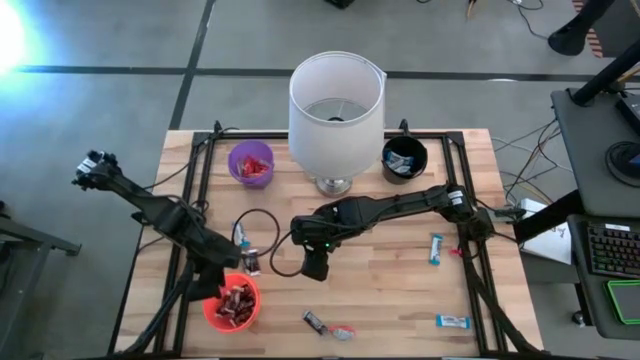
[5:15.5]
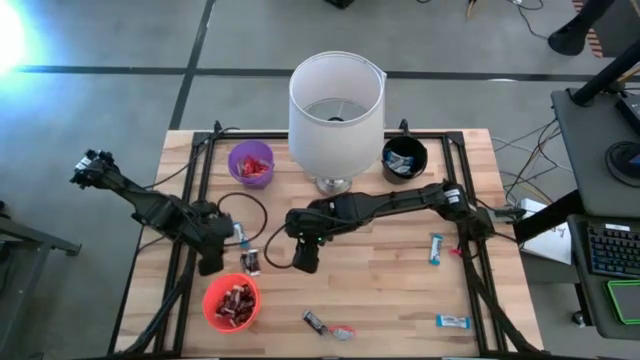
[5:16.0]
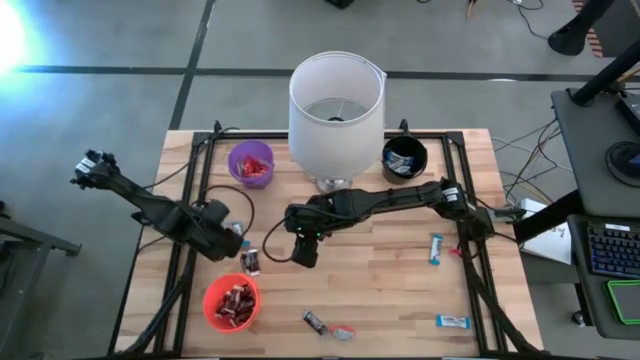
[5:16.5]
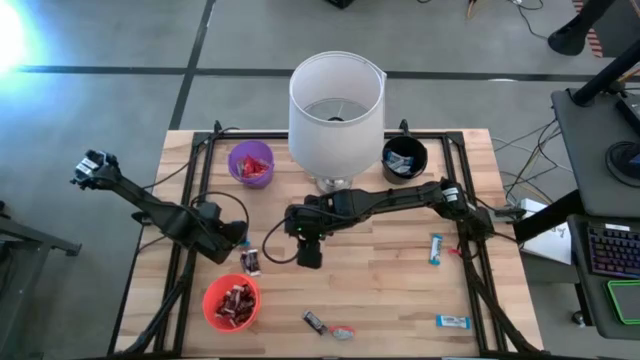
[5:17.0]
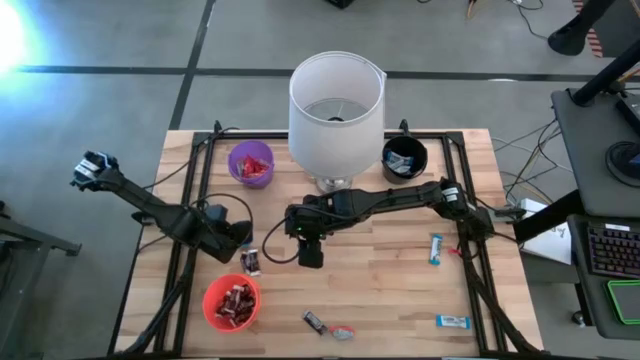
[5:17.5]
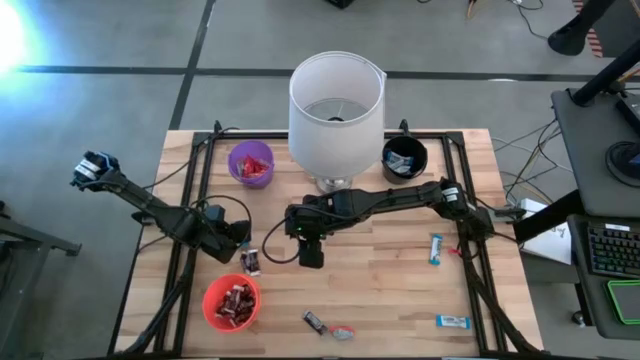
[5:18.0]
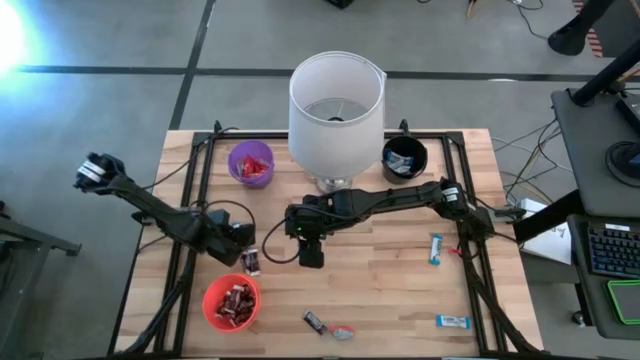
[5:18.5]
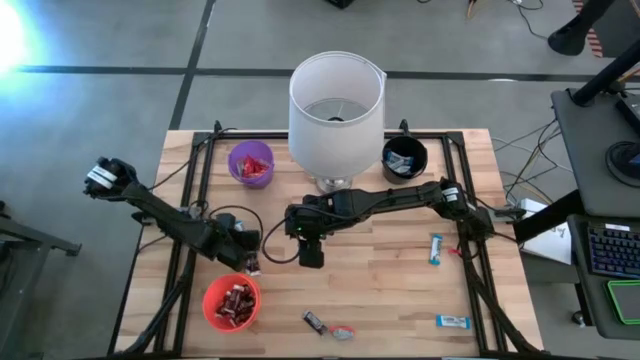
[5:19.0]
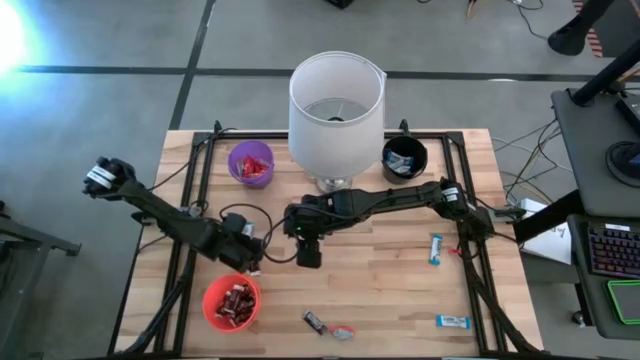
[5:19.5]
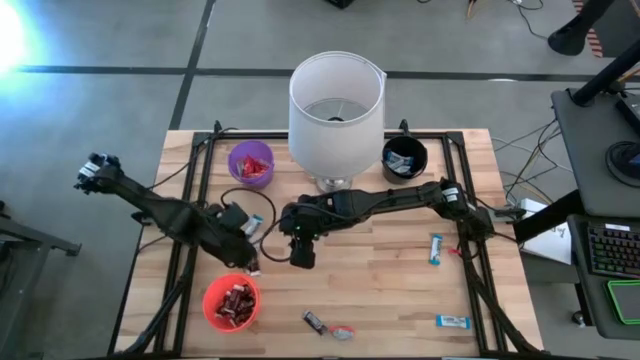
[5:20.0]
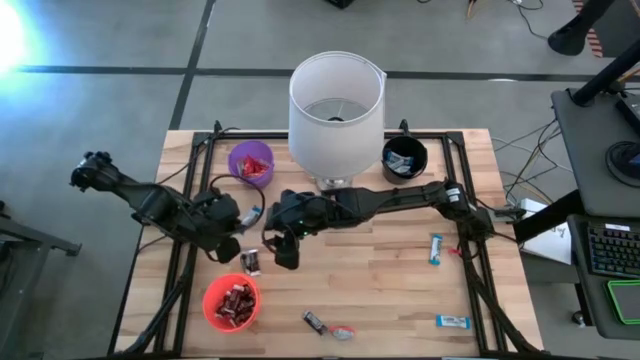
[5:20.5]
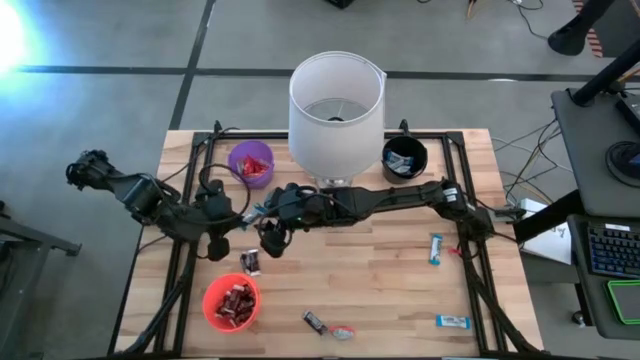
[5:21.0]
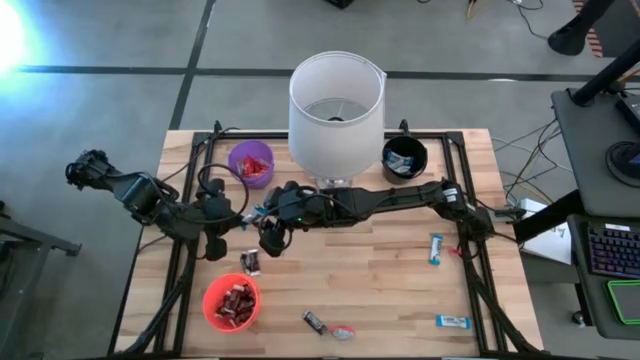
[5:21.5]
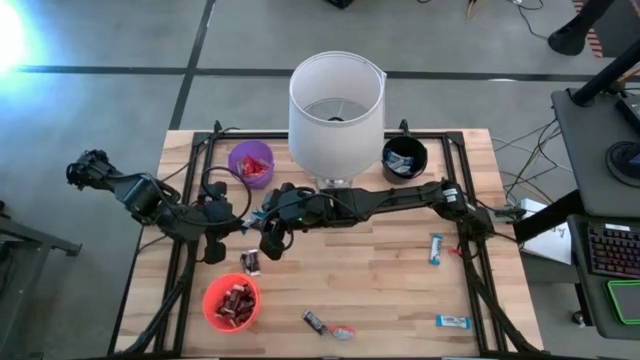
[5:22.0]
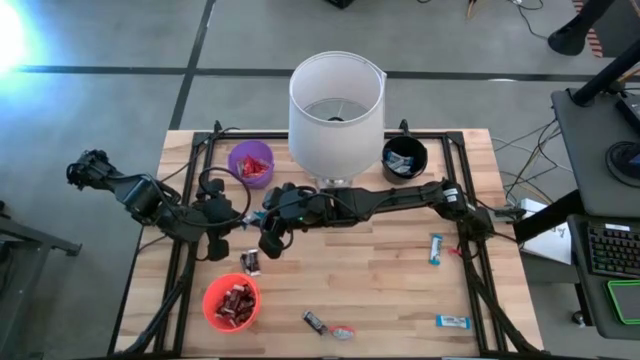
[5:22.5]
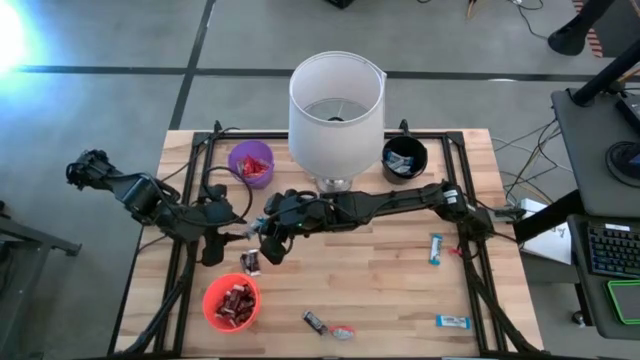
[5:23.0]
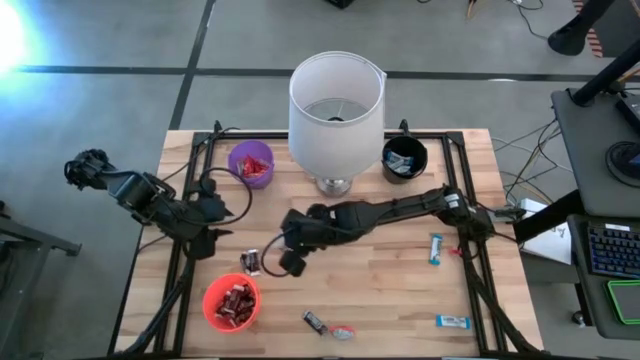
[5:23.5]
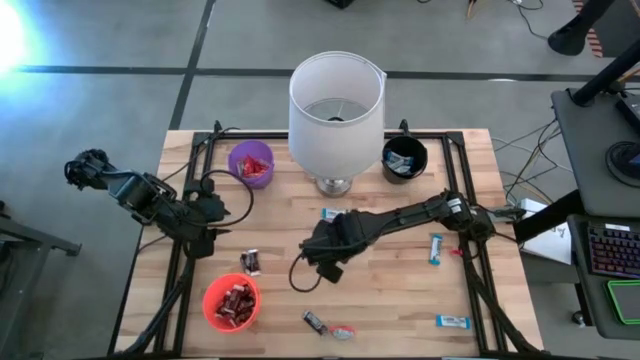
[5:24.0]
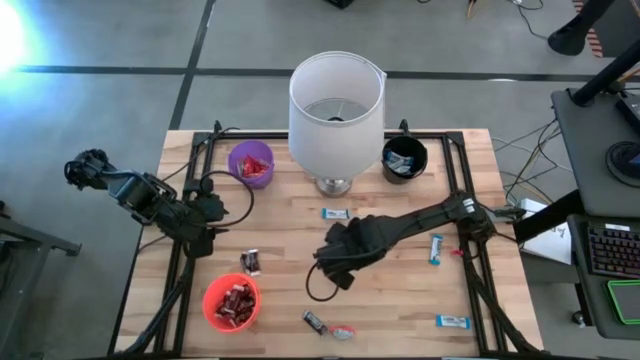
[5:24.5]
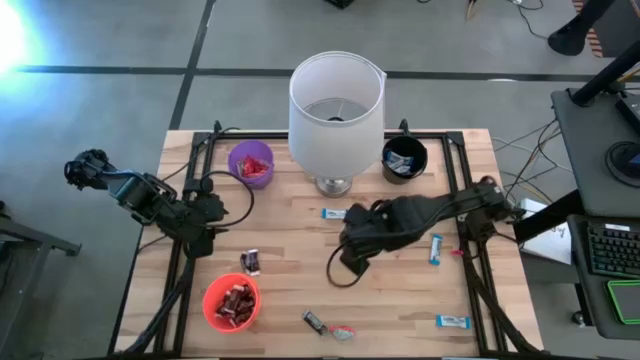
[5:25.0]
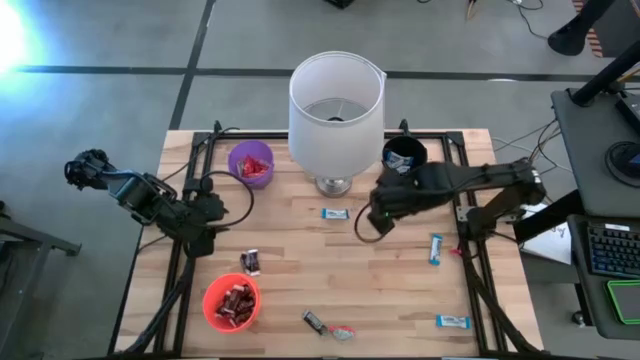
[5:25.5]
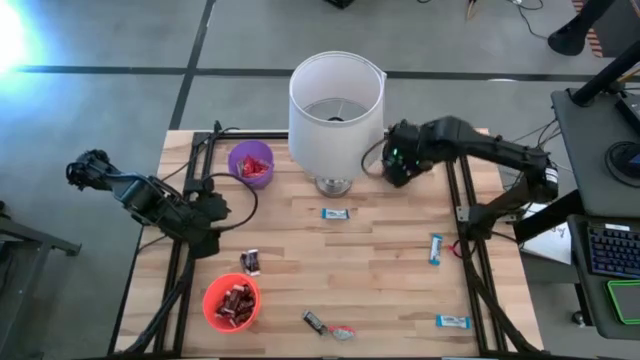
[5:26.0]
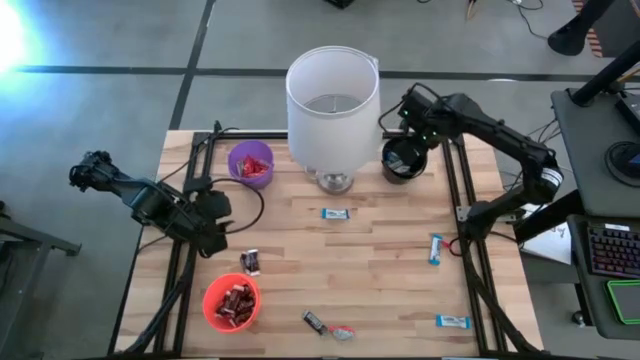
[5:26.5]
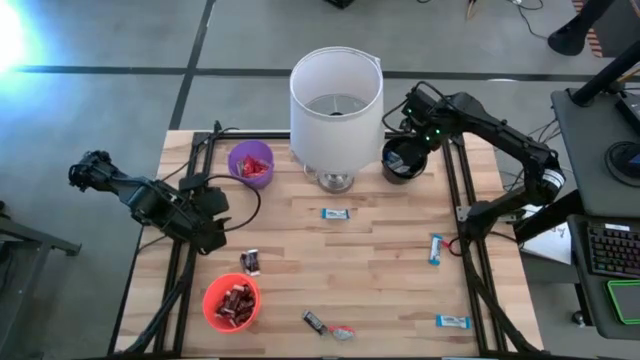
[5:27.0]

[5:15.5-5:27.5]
Task: Sort candy
Put the white chocolate into the black bin

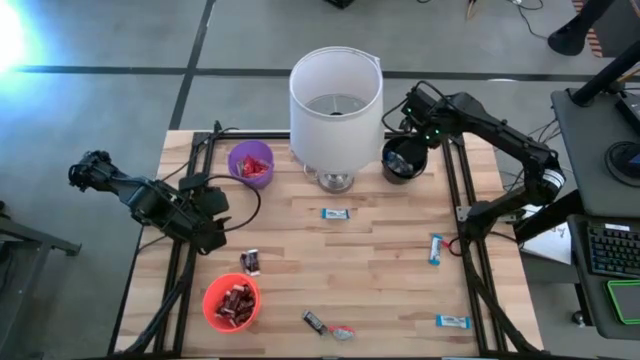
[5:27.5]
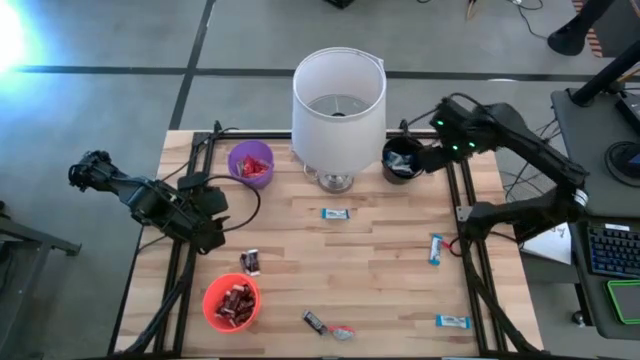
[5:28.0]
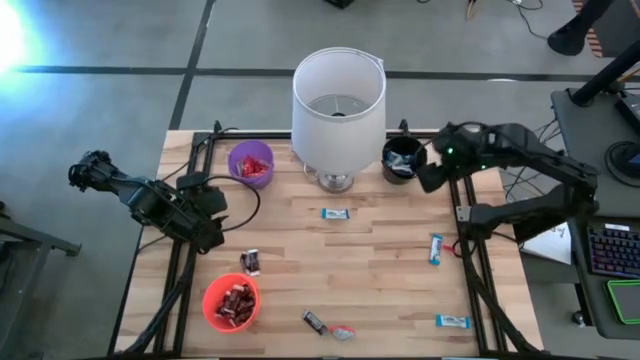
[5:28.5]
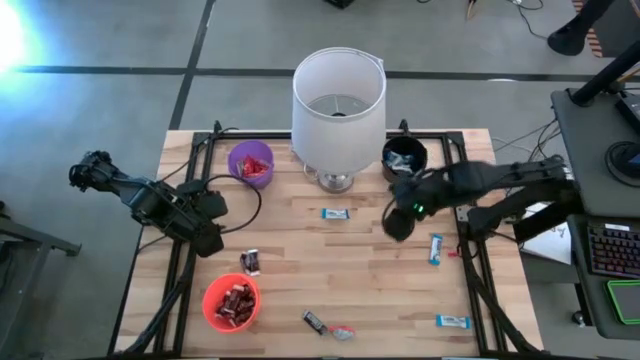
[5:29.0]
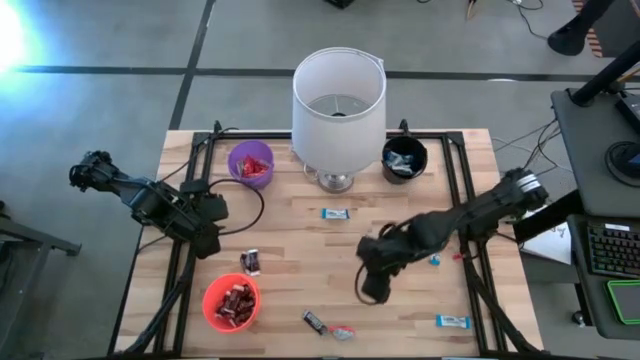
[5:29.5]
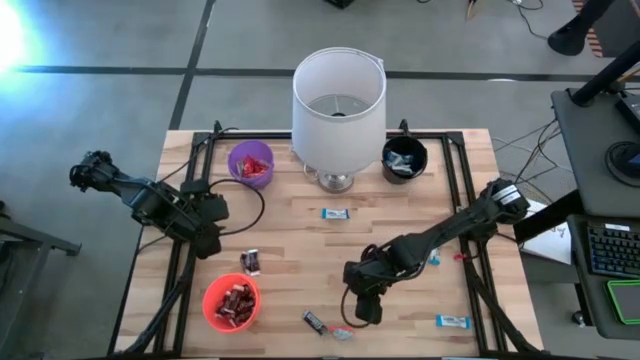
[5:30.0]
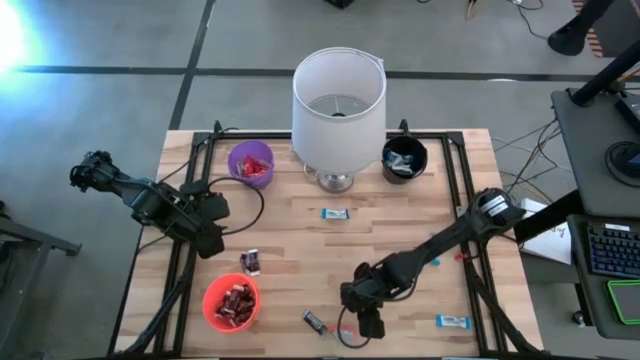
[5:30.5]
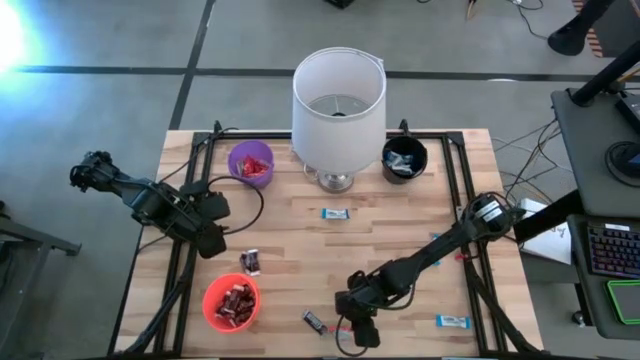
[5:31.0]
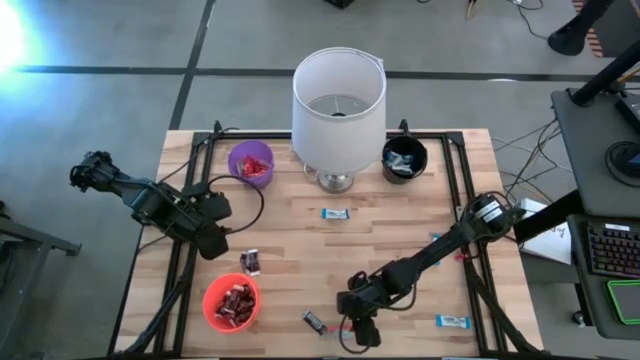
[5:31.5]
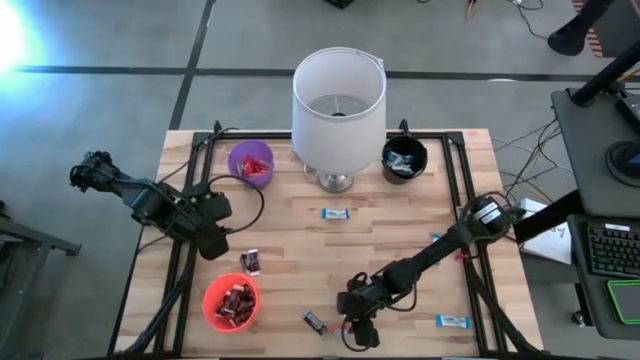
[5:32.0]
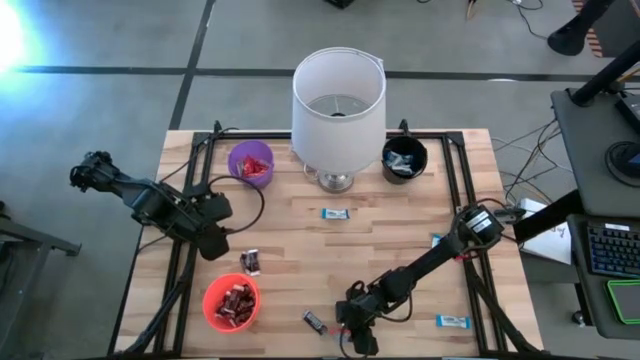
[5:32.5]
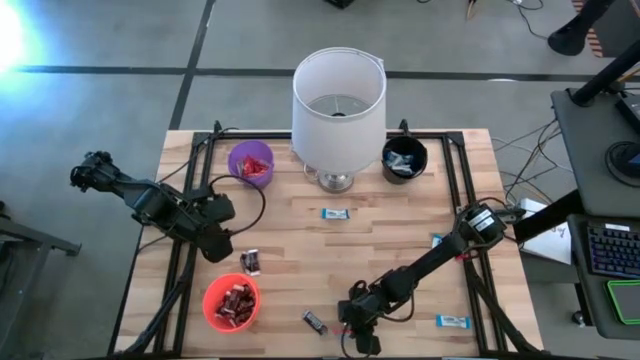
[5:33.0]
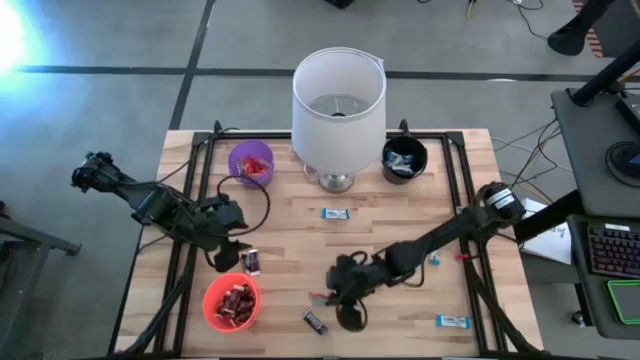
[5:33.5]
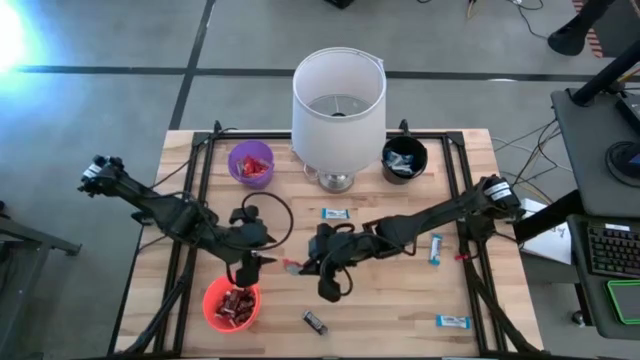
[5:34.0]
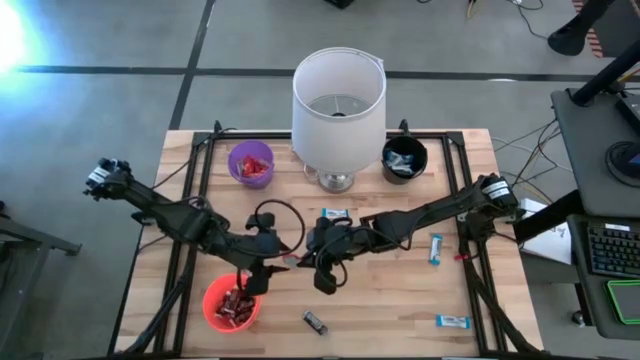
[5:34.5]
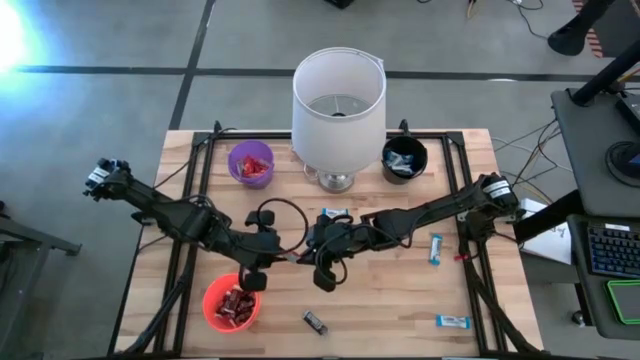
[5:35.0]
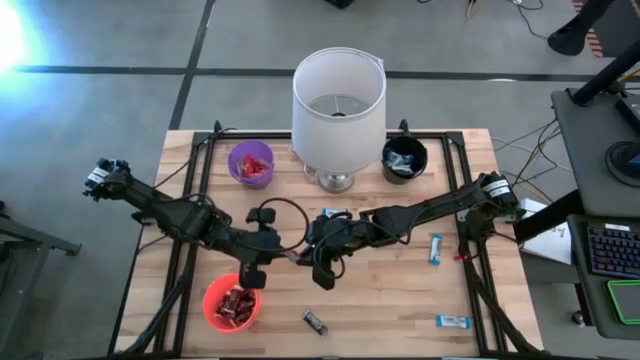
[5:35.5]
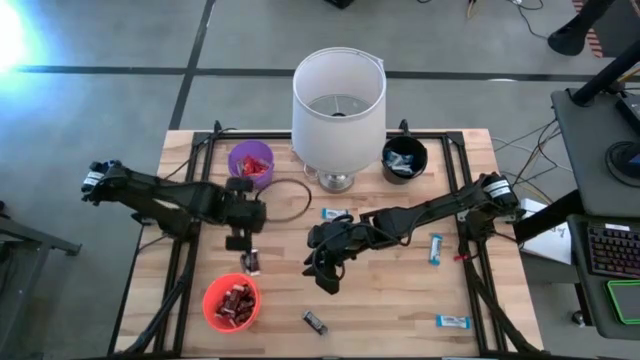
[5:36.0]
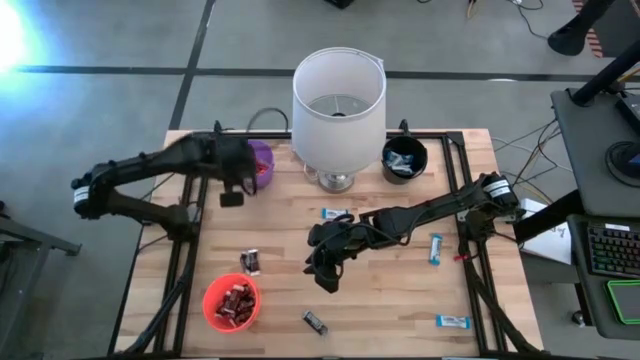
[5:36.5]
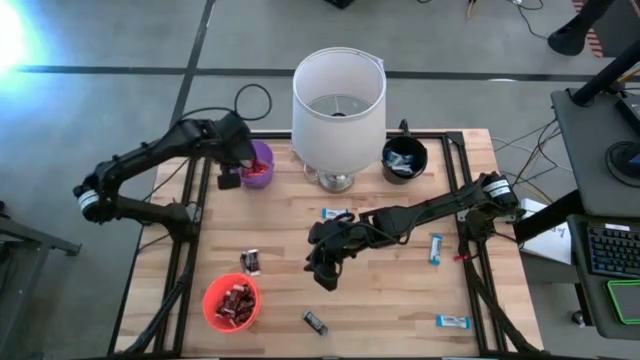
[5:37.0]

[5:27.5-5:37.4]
Put the orange chocolate into the purple bucket
